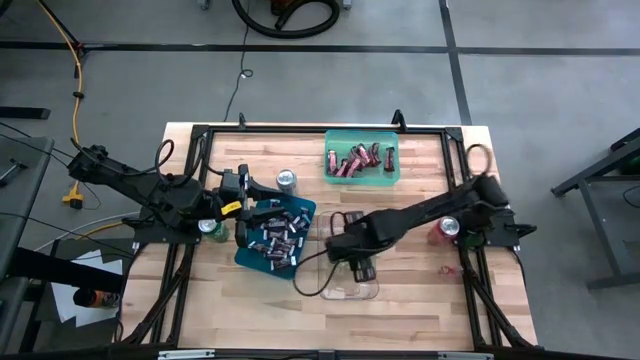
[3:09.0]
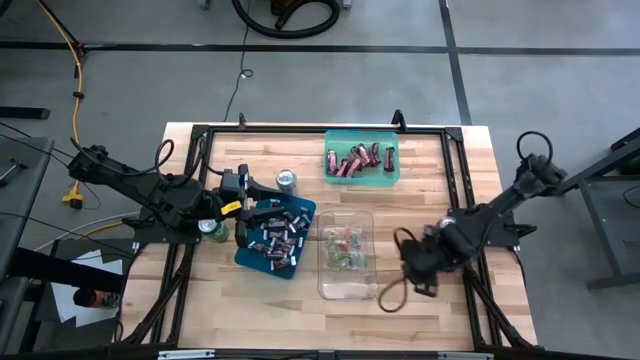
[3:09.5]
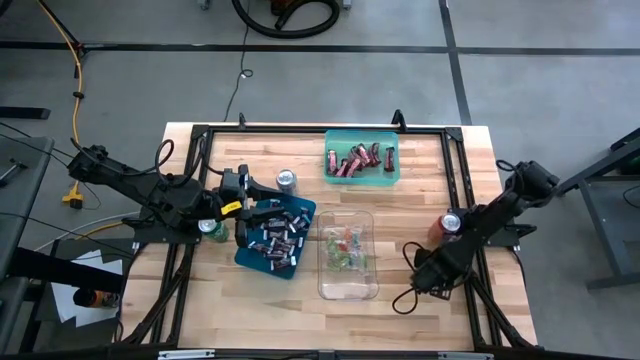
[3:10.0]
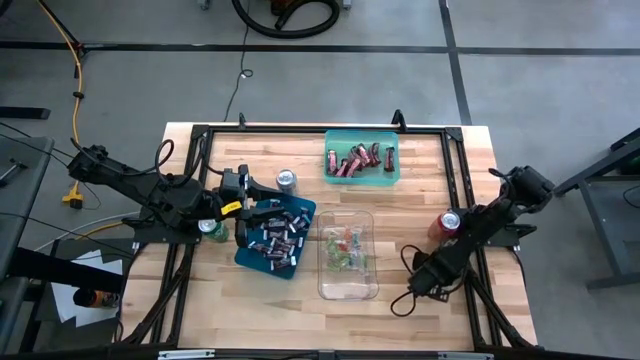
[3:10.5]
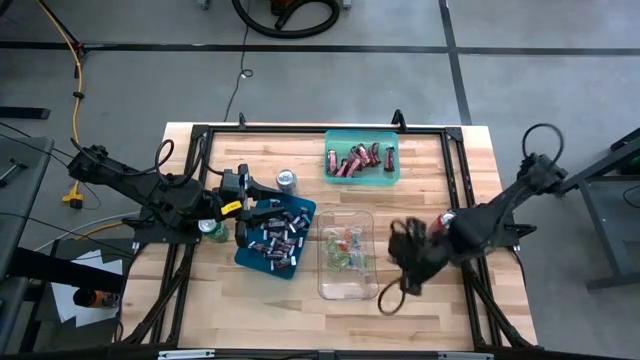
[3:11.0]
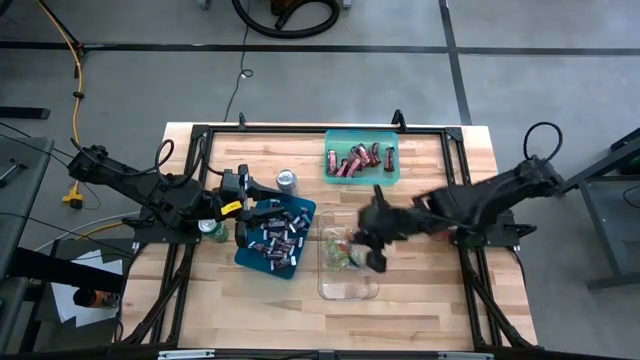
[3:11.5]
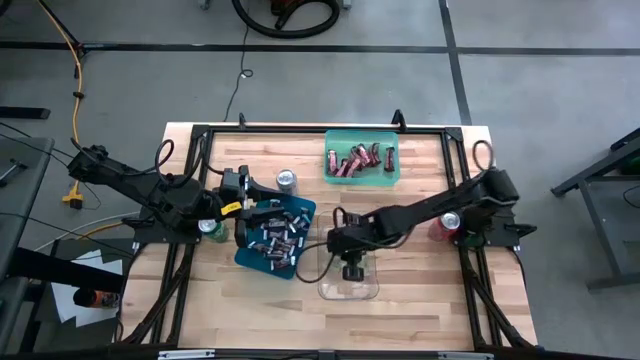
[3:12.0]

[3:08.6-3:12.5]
Task: Sort candy
Put the orange candy into the transparent bin

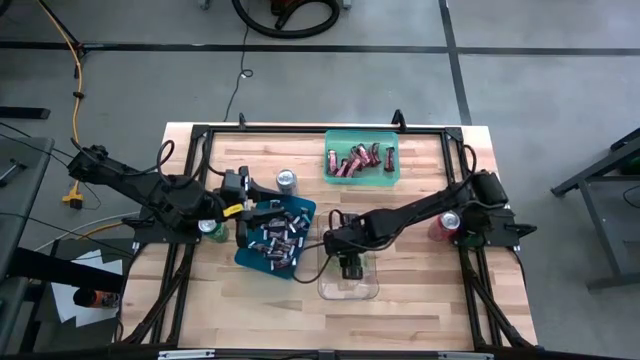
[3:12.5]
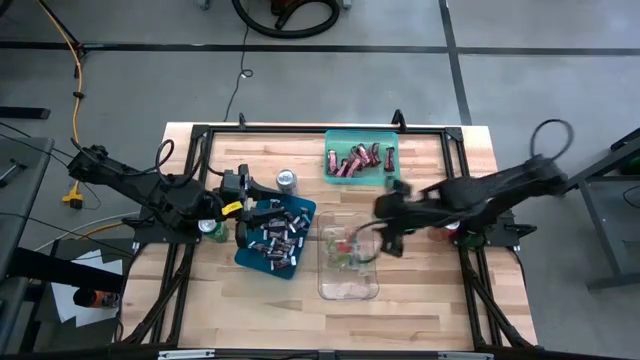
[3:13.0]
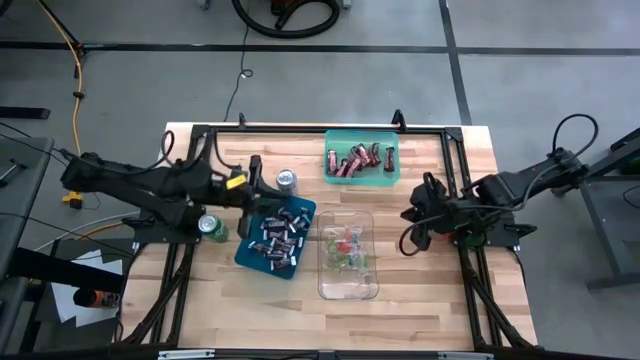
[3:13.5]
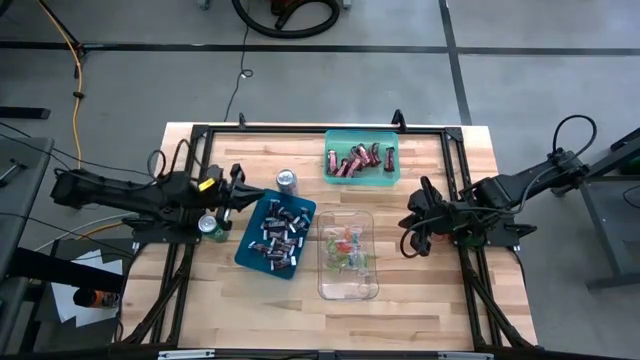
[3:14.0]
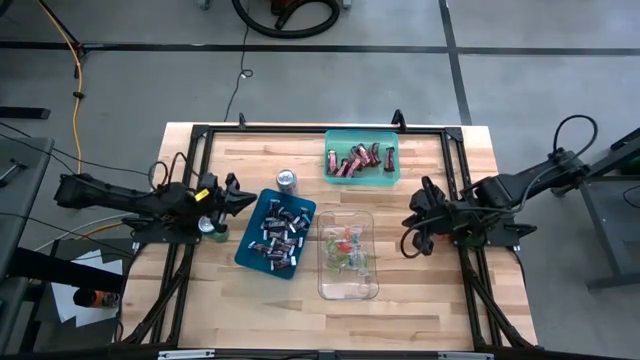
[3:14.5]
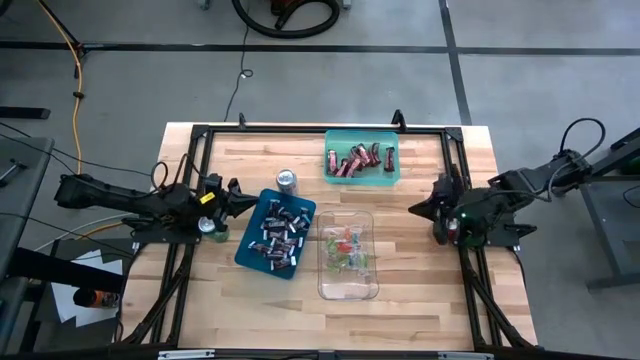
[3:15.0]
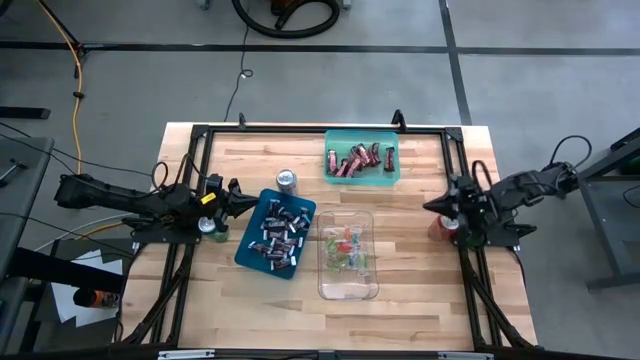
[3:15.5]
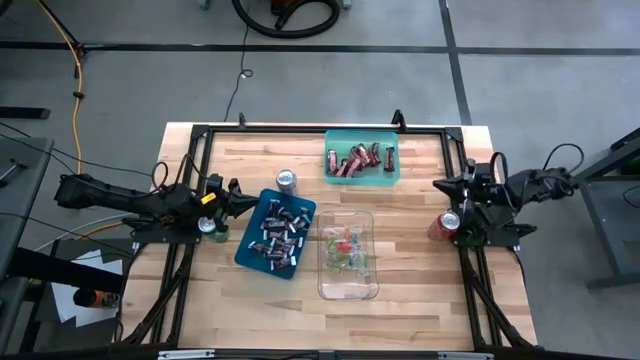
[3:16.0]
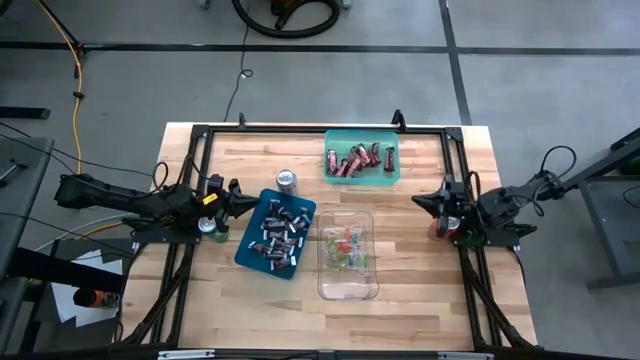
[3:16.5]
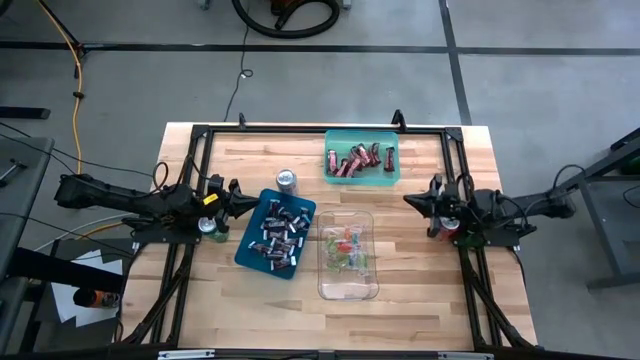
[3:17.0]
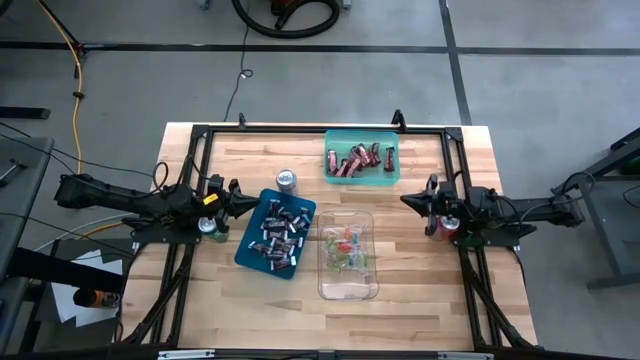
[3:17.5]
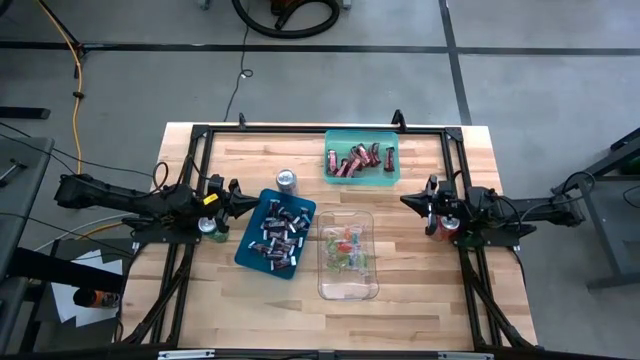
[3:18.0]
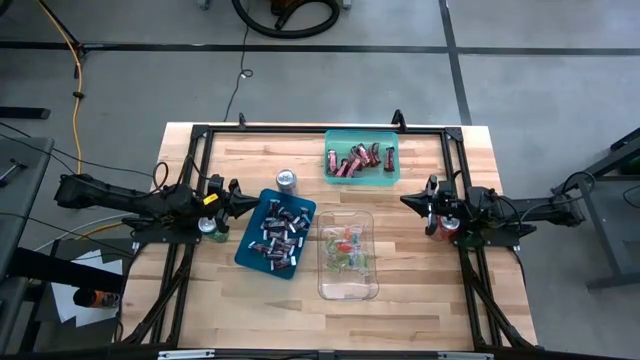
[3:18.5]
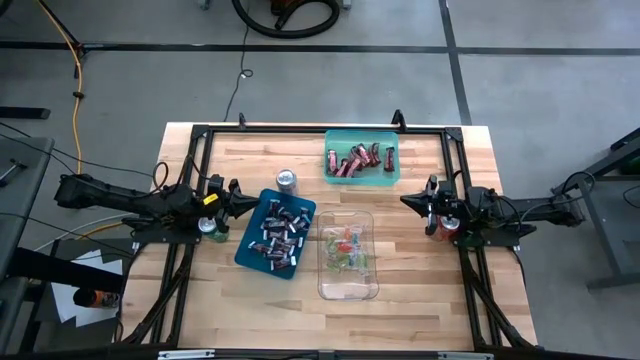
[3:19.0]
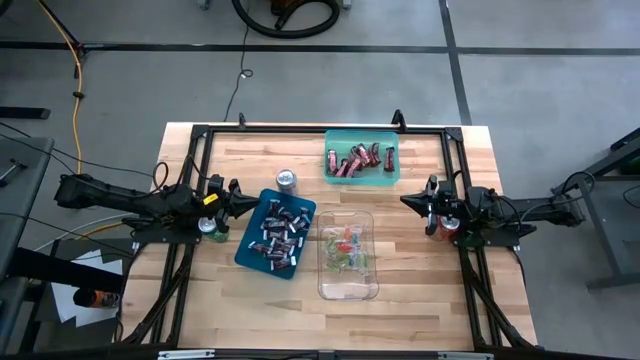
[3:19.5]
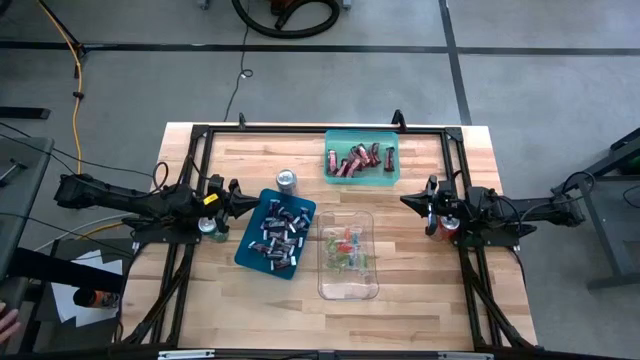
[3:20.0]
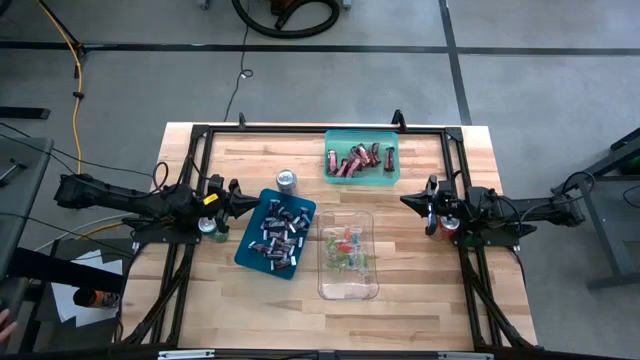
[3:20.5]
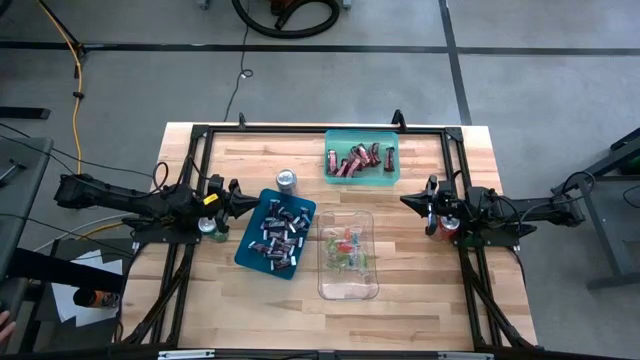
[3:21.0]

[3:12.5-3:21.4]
Return to Home Position

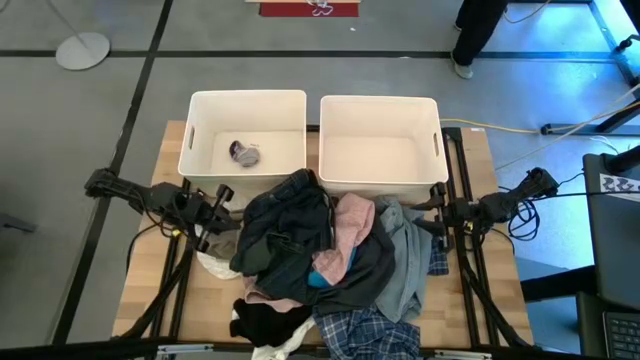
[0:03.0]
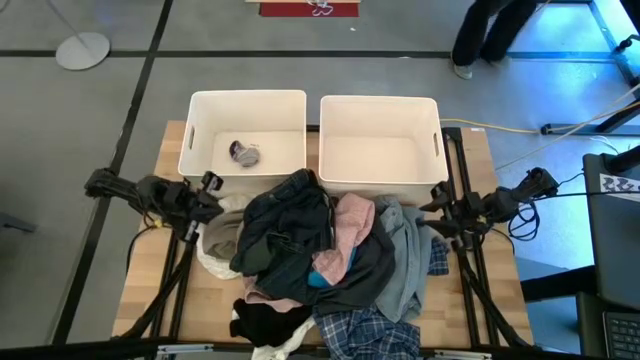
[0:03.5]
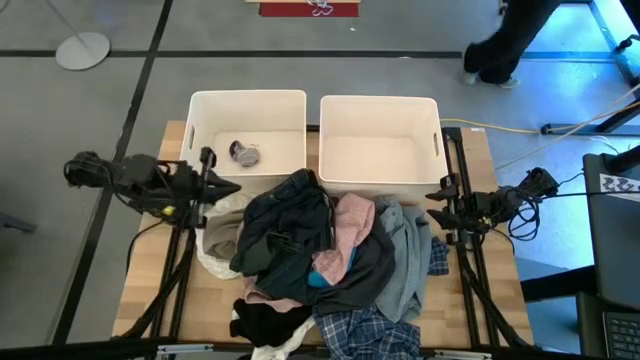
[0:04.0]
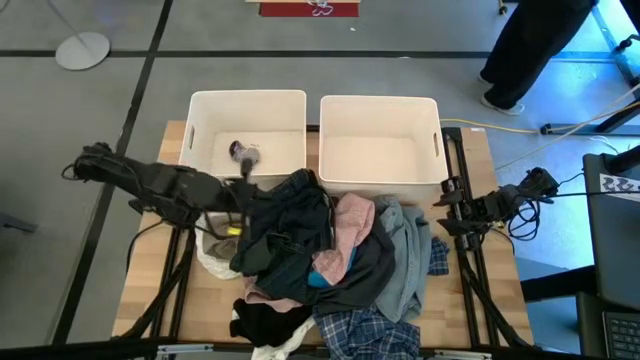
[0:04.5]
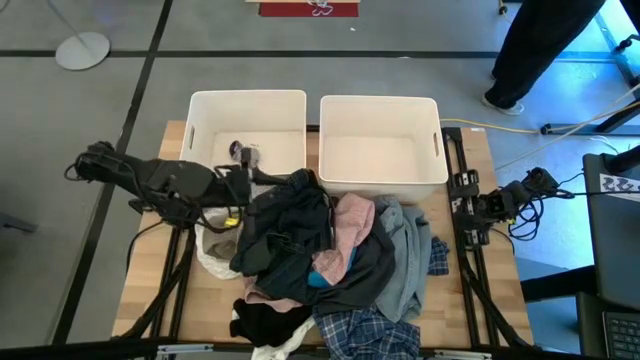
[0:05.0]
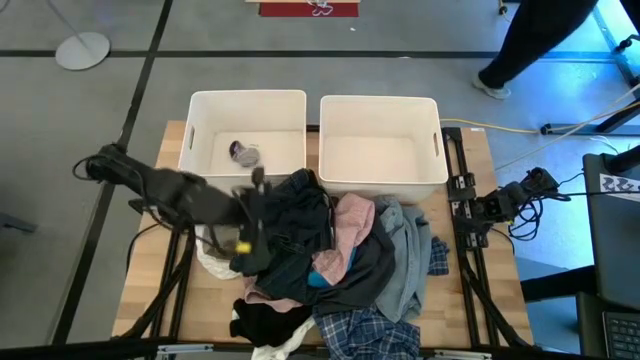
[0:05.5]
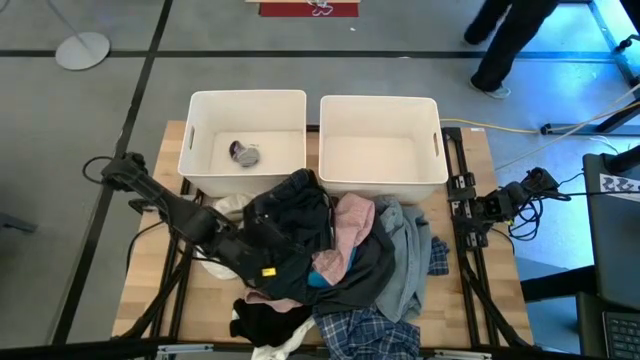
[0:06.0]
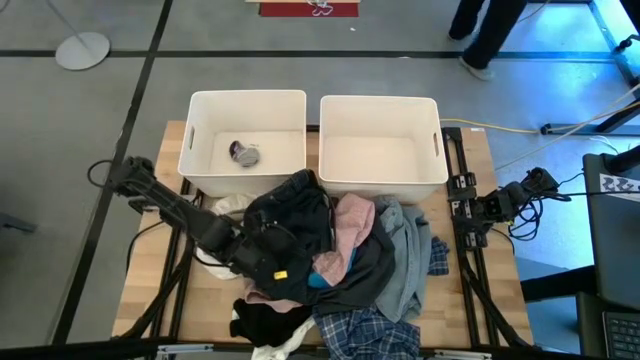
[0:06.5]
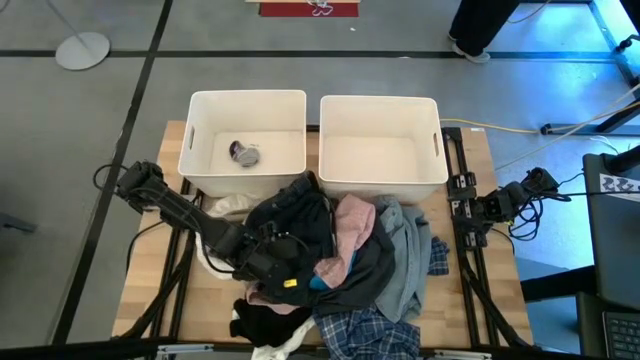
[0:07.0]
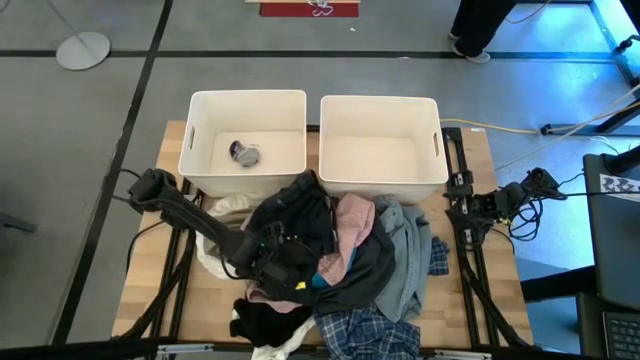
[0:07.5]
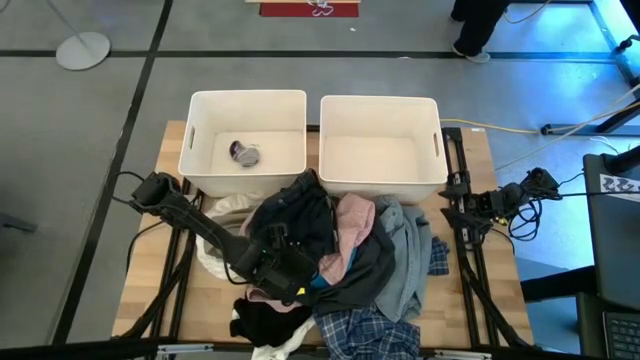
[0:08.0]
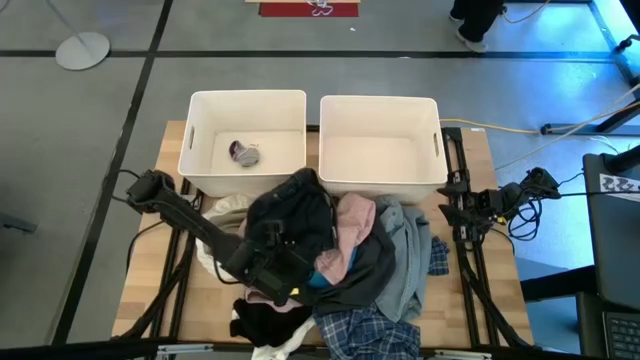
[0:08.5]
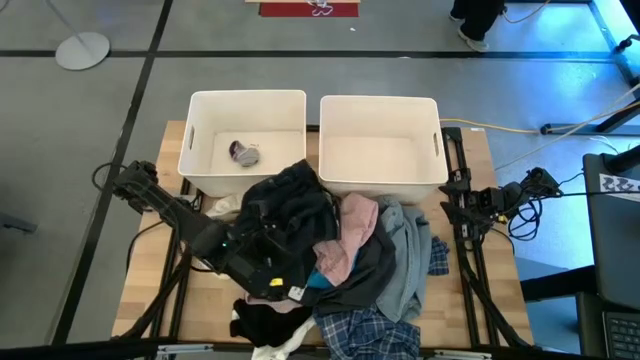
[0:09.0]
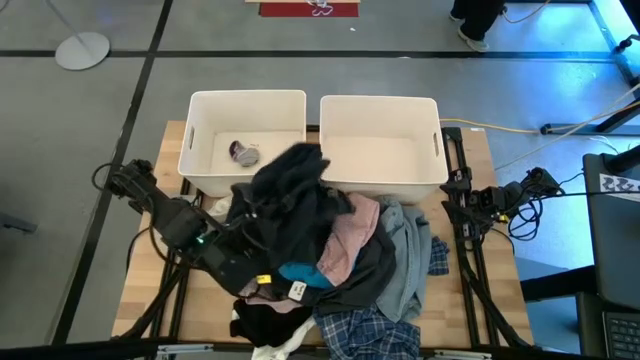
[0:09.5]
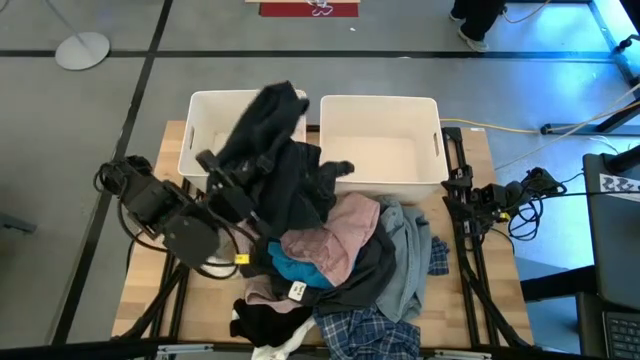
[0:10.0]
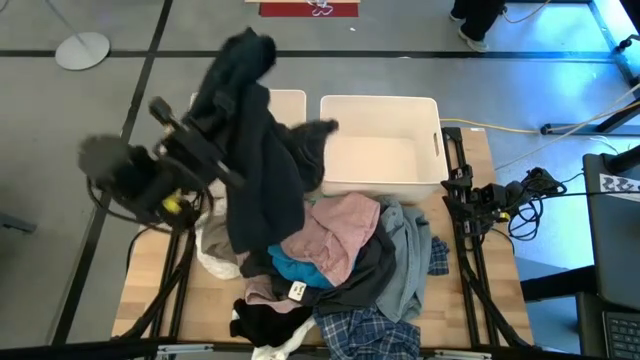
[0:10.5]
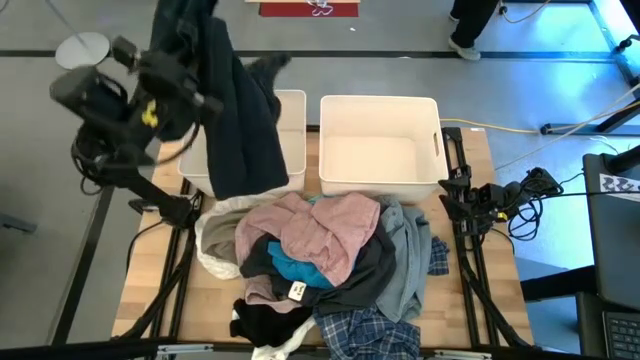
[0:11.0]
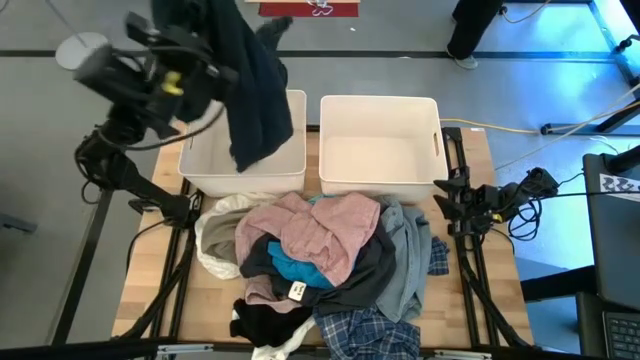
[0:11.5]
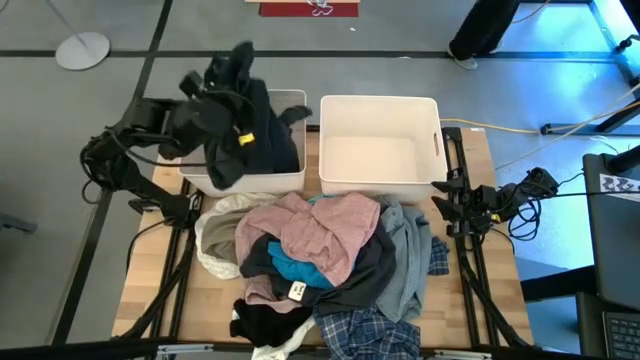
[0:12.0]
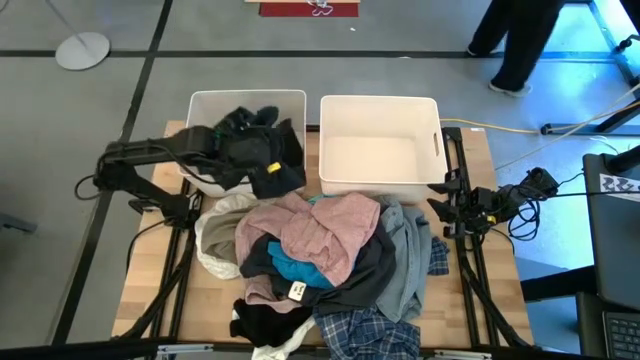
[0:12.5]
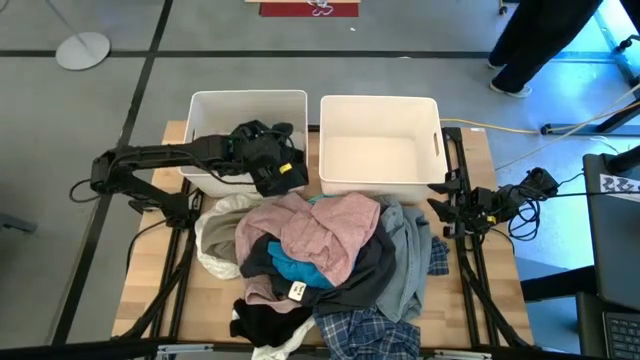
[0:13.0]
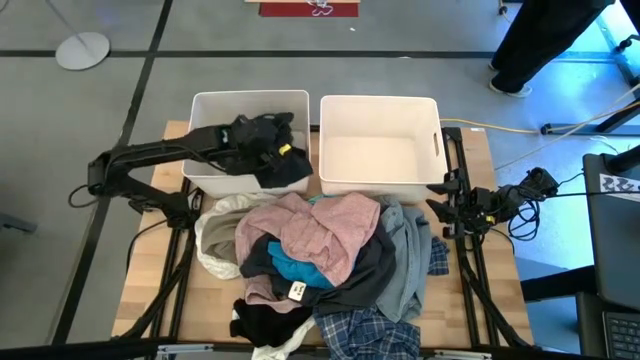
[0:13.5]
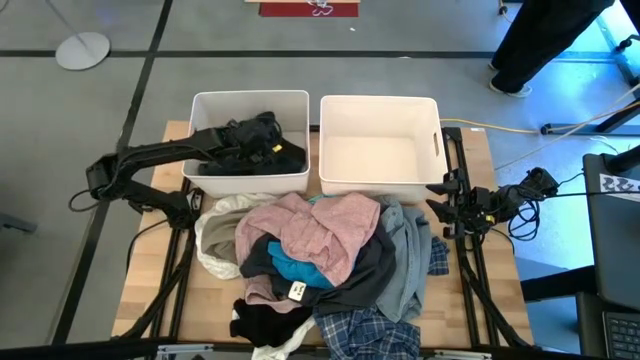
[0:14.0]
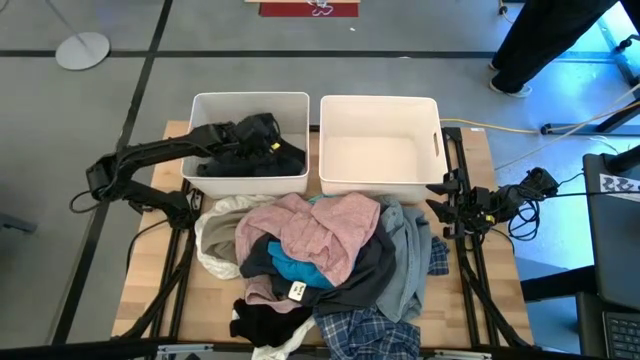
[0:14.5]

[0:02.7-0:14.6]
Task: Sort clothes
Put the dark blue pants into the left white bin
